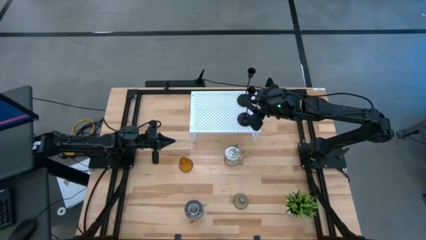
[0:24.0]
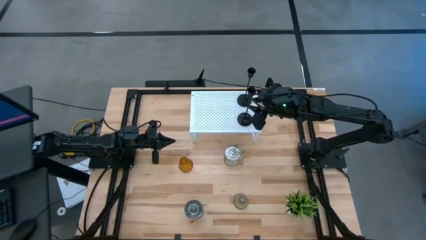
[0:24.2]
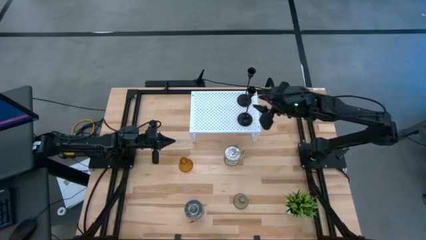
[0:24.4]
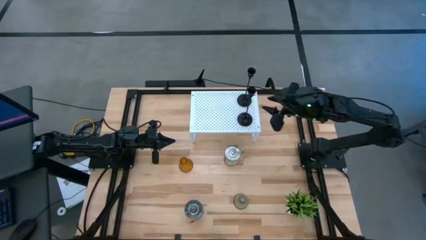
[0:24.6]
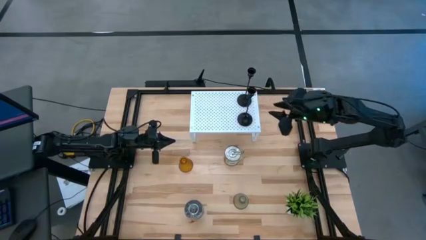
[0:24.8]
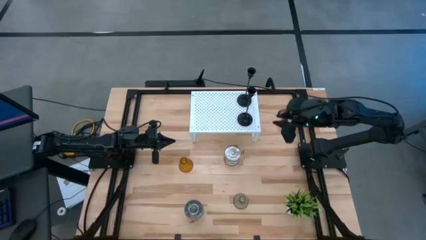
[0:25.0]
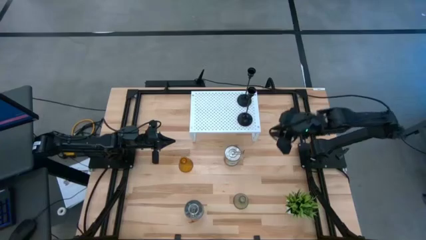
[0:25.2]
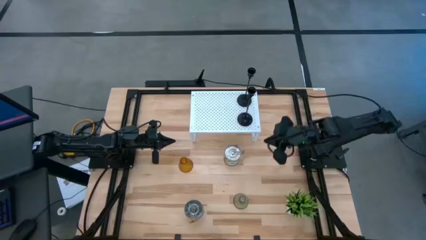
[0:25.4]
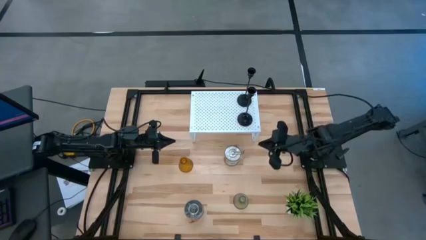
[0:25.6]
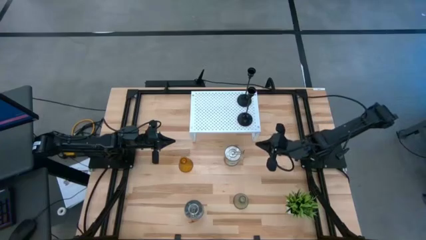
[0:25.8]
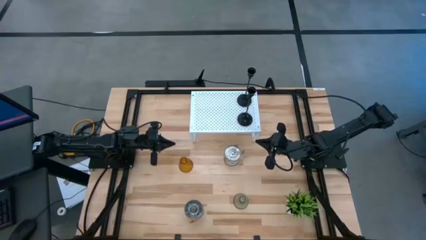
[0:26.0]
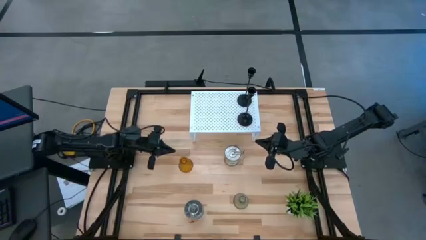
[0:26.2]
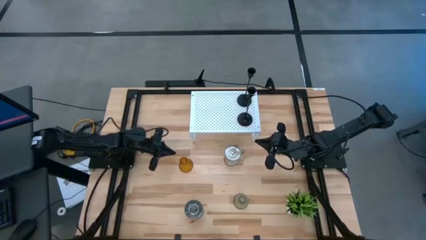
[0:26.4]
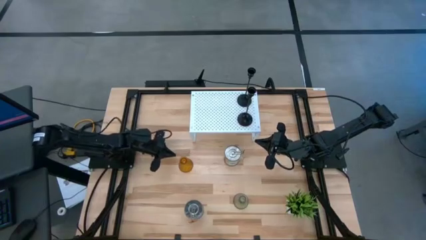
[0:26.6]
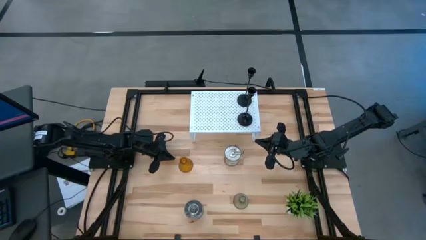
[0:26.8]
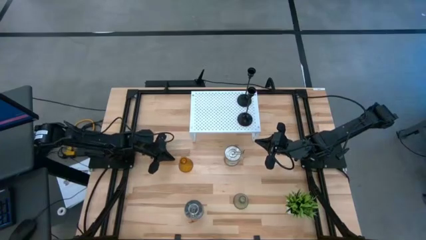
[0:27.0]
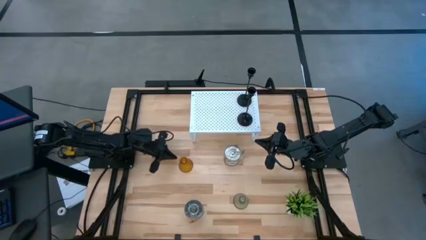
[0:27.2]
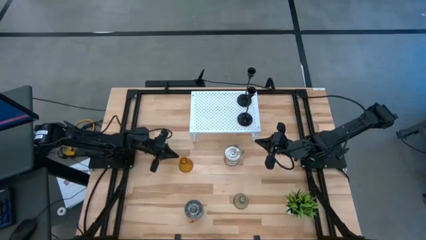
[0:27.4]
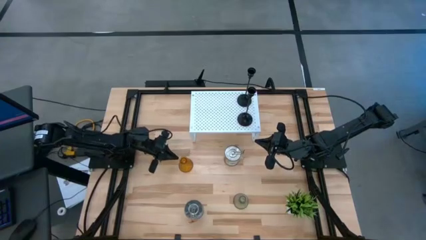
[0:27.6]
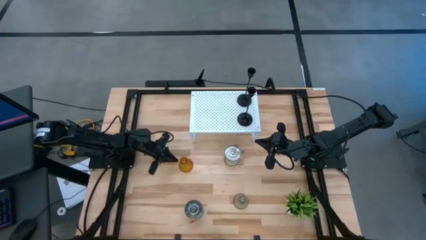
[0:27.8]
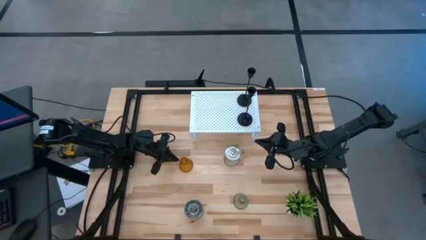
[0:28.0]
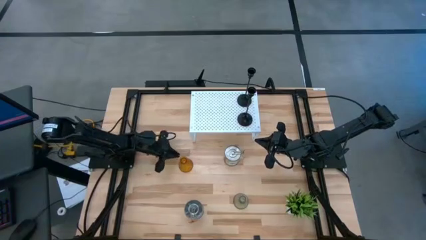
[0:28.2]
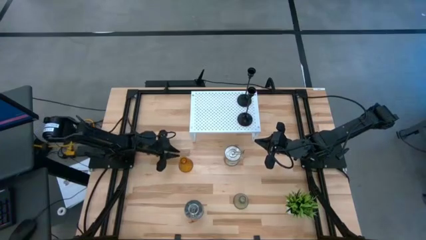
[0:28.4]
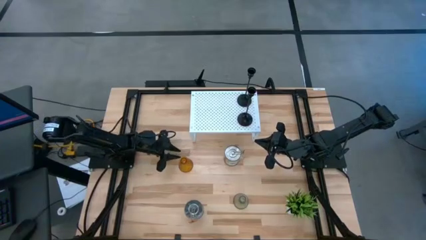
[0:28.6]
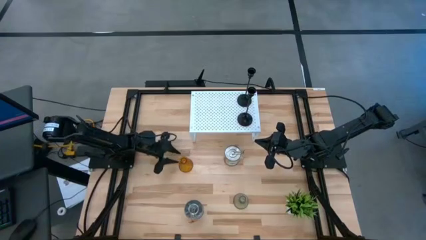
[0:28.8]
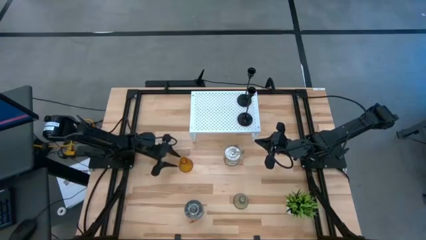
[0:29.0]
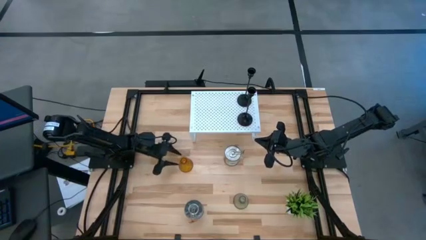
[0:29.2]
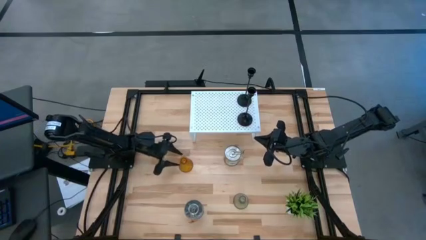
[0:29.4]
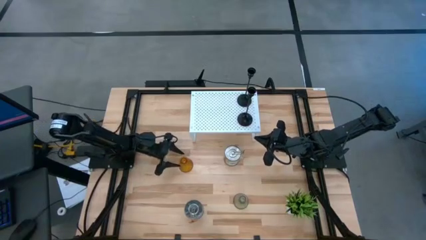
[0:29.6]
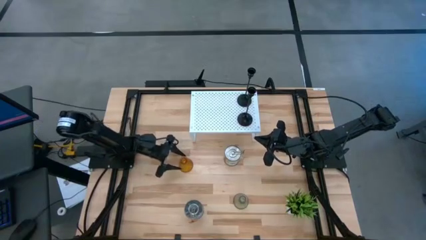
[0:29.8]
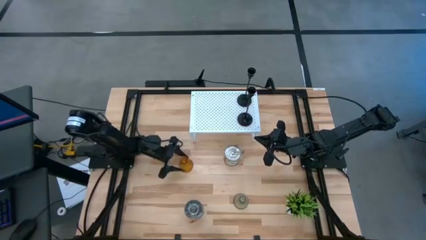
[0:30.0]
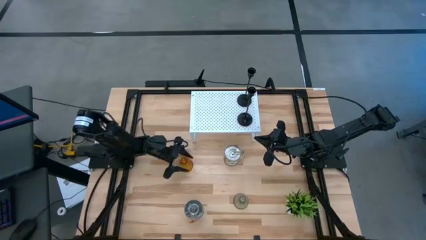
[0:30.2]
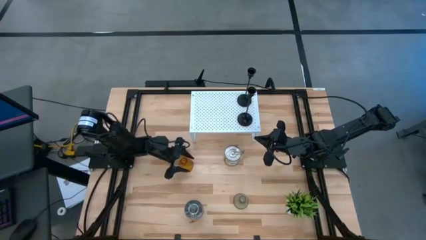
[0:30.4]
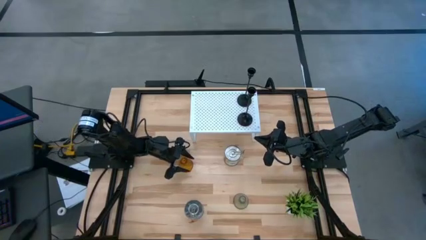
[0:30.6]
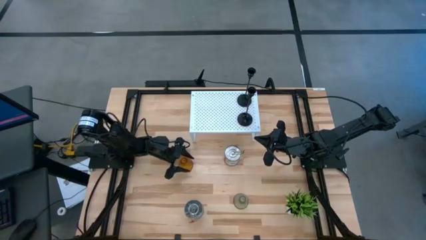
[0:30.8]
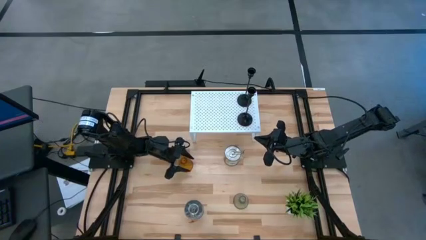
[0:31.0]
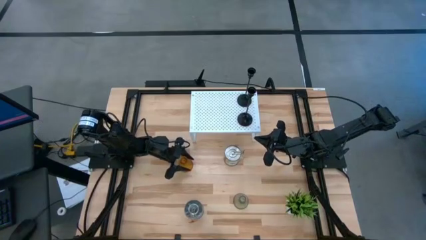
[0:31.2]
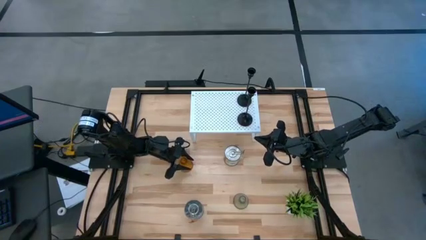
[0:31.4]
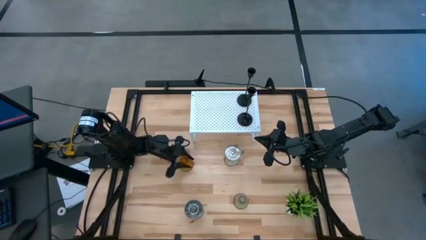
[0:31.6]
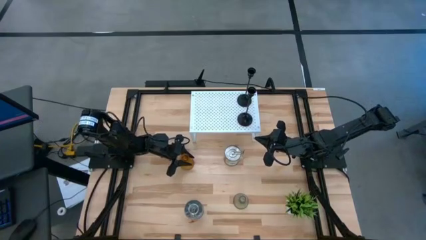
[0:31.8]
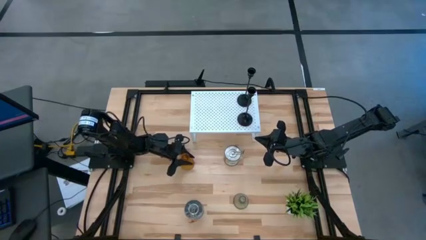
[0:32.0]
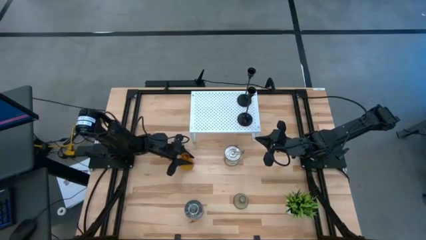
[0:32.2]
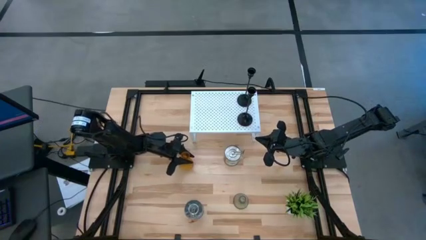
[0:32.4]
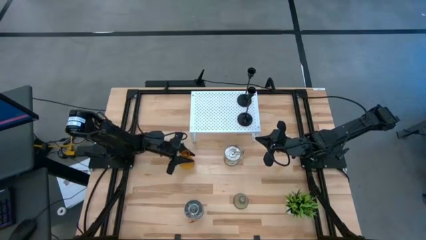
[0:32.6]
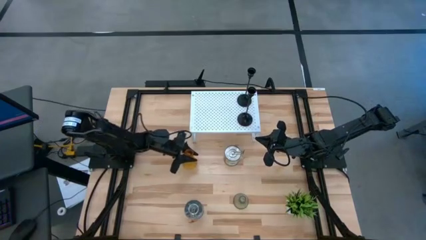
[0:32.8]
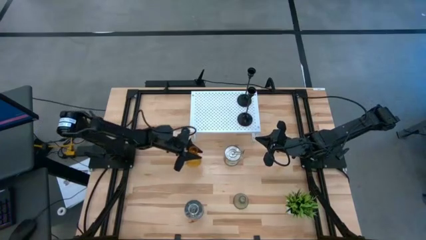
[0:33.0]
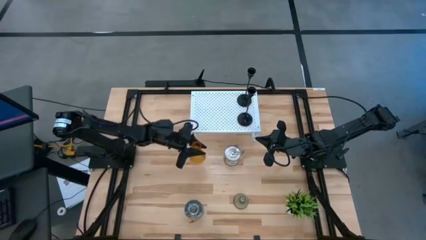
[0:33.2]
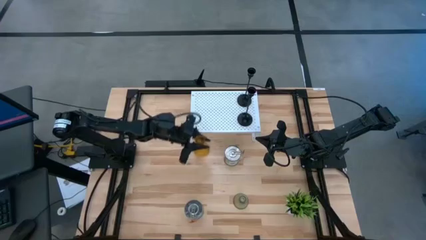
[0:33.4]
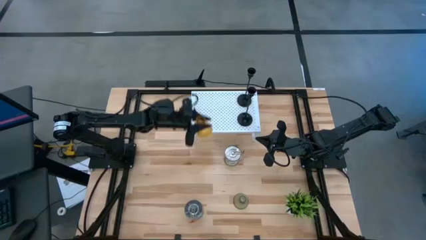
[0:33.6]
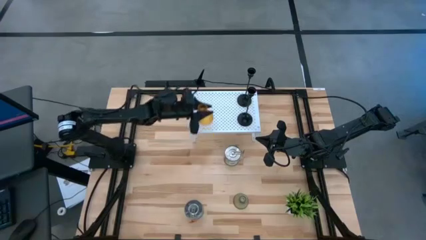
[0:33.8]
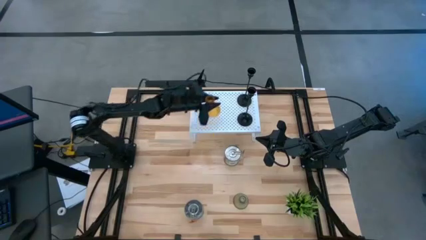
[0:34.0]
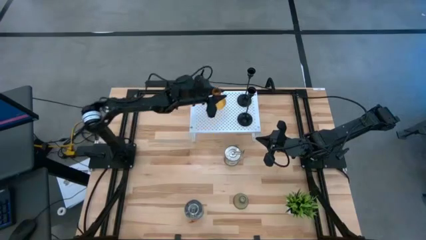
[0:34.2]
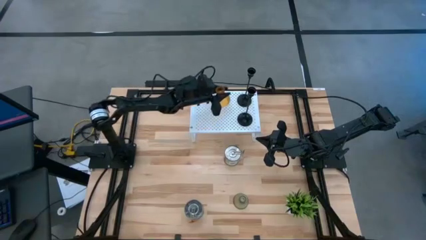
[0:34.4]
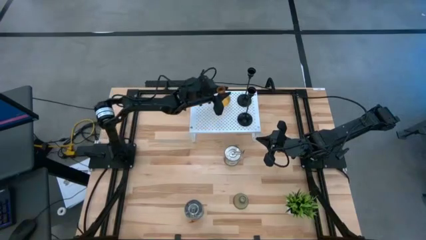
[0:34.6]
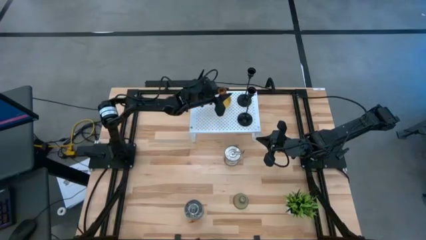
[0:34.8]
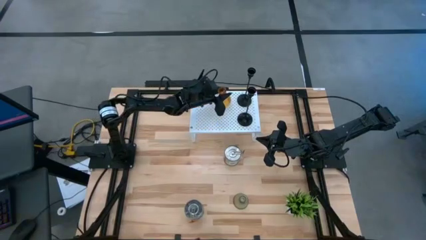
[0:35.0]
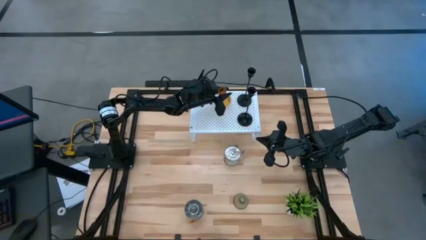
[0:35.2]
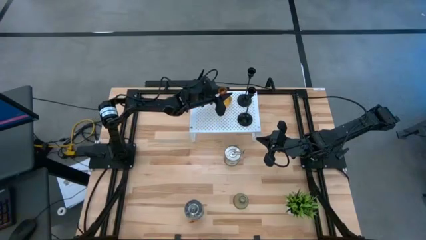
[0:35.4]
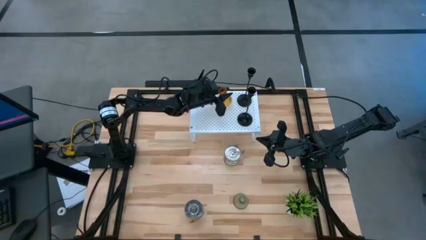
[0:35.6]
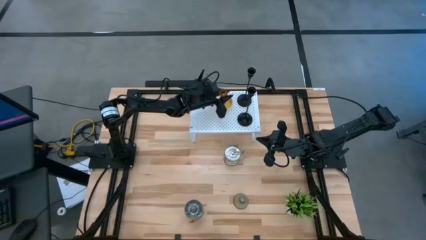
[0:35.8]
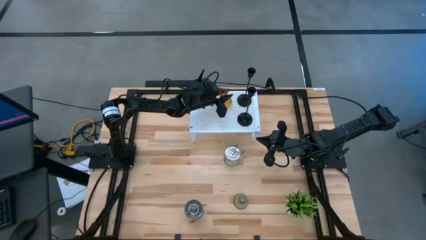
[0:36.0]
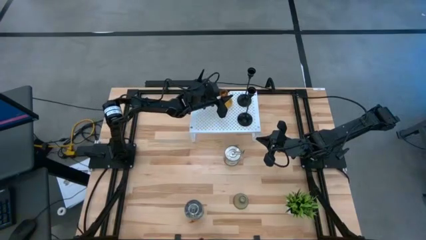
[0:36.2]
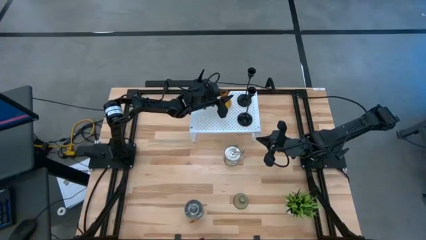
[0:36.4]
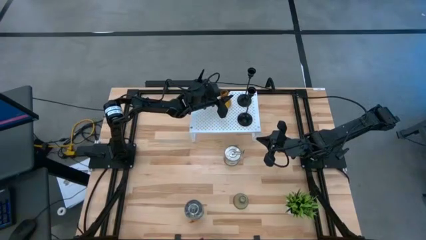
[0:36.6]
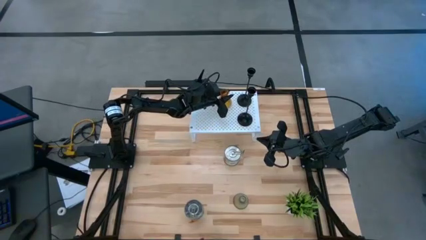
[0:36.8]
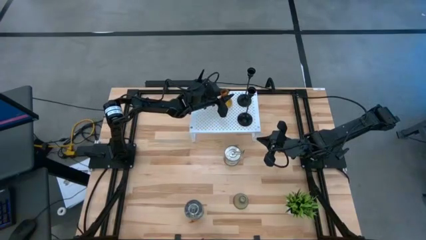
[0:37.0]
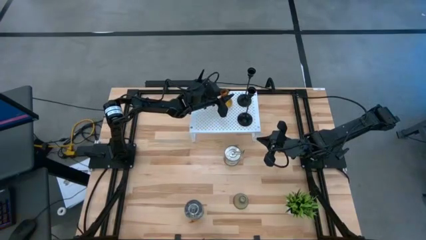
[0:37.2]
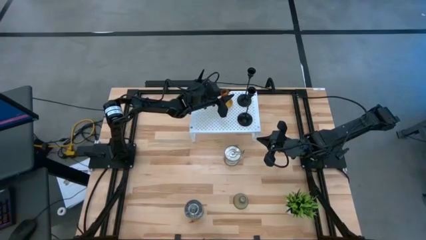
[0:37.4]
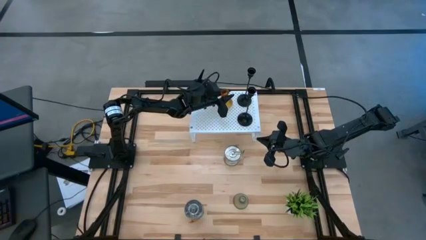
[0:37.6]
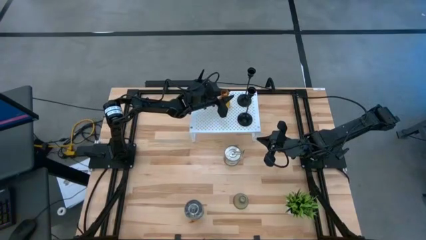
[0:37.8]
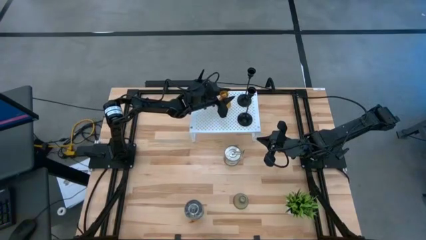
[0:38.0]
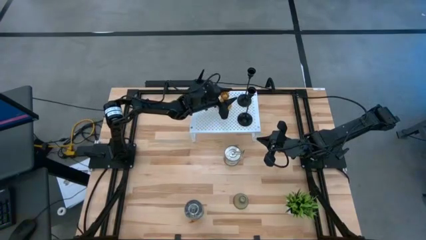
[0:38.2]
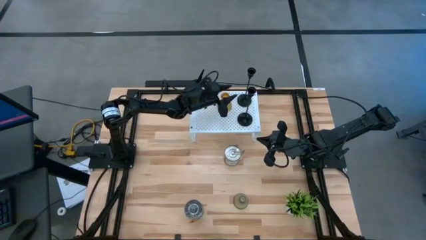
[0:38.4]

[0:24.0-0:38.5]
Task: Pick & Place candle stick holders
Put the brown glass candle holder on the shelf

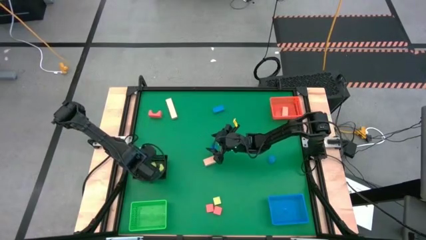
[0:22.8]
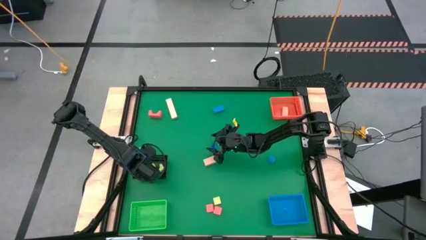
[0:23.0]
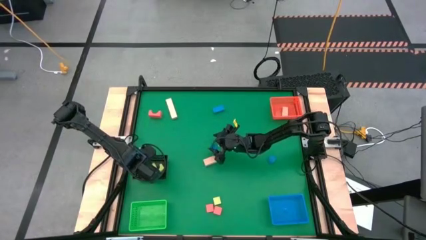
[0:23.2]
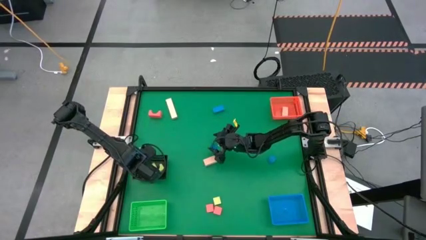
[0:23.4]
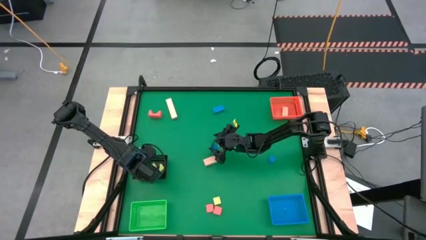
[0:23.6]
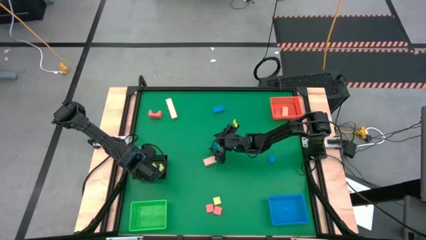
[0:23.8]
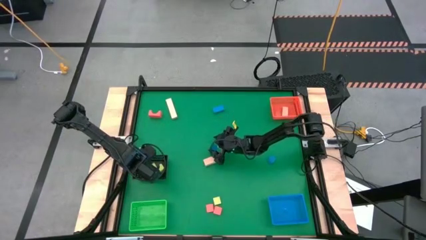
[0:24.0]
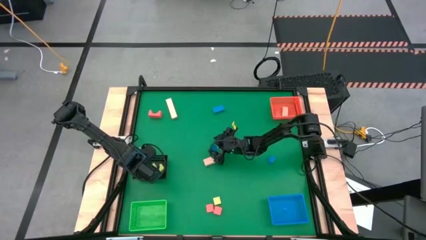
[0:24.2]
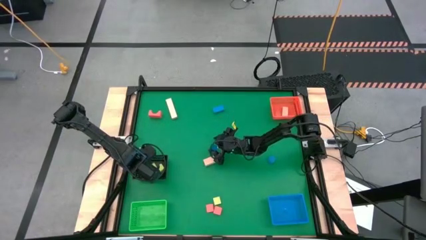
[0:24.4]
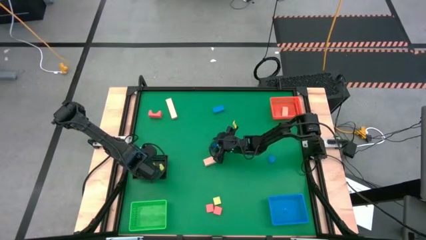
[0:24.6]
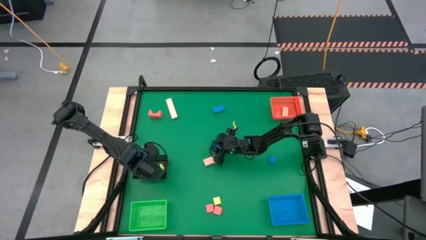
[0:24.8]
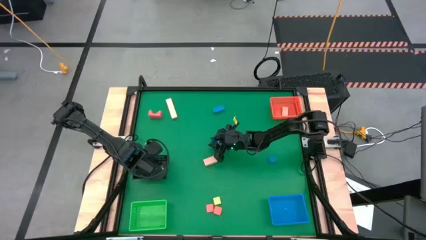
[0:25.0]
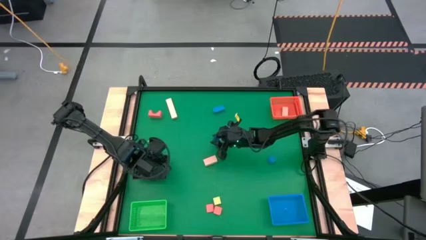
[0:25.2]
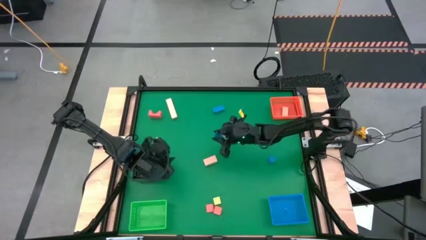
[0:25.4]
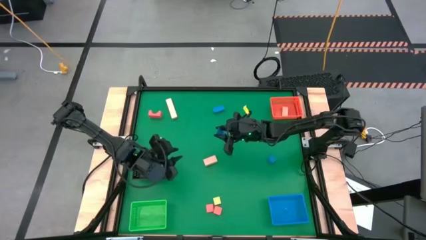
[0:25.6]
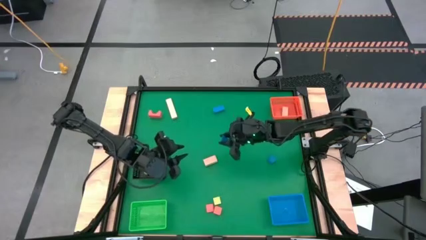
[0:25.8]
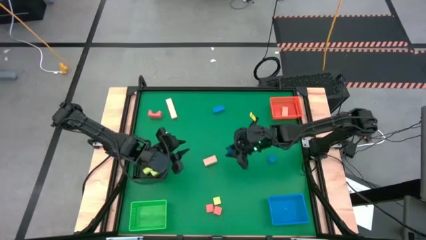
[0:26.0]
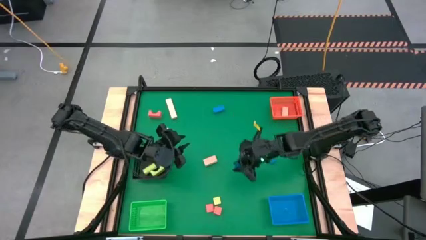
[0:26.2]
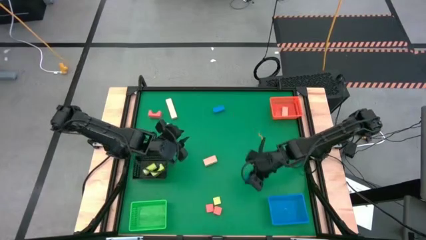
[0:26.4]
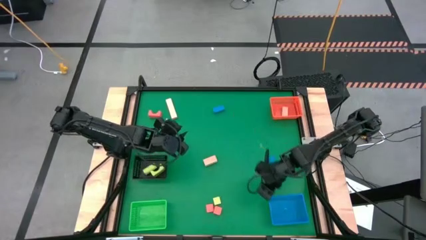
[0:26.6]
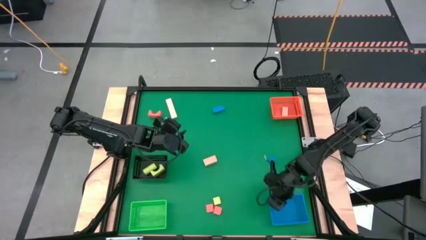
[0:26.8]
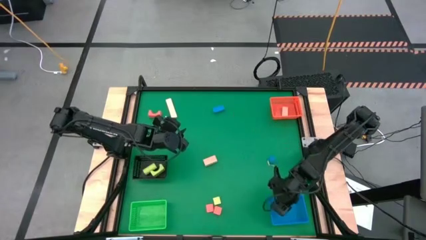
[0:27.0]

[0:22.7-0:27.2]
Task: Sort & place blocks by color
Put the bottom left blue wooden block into the blue basket
